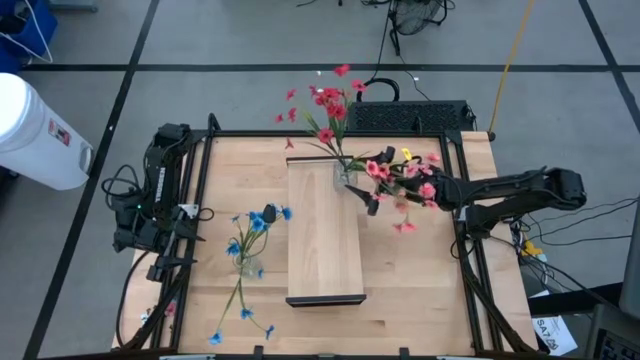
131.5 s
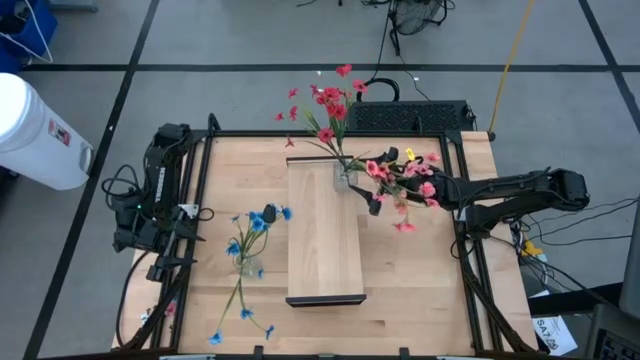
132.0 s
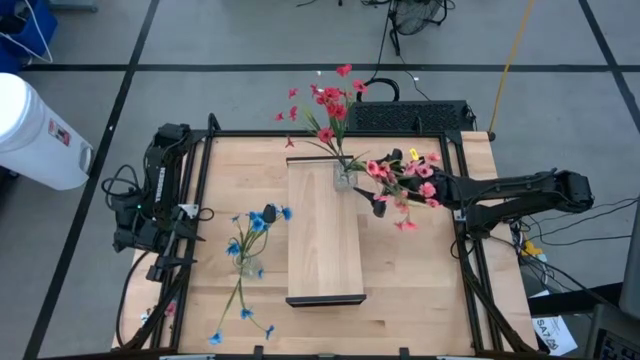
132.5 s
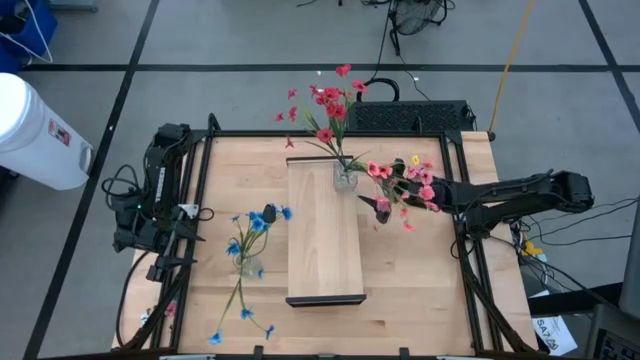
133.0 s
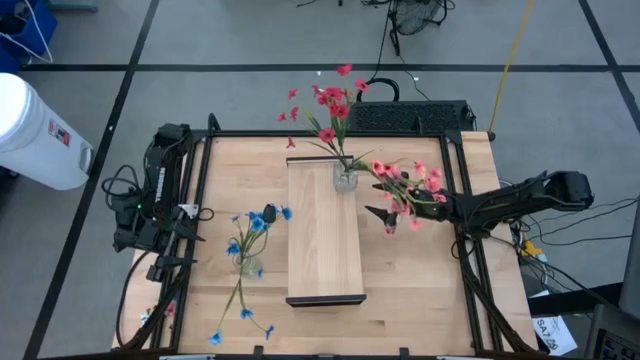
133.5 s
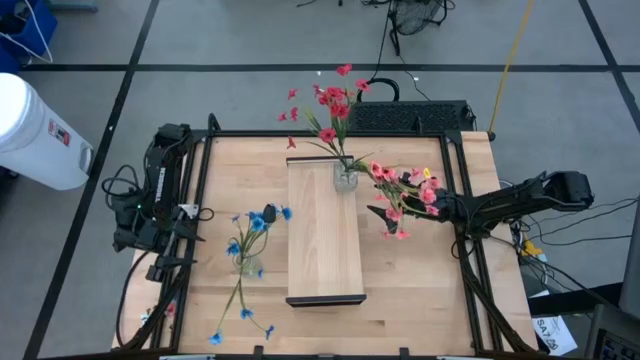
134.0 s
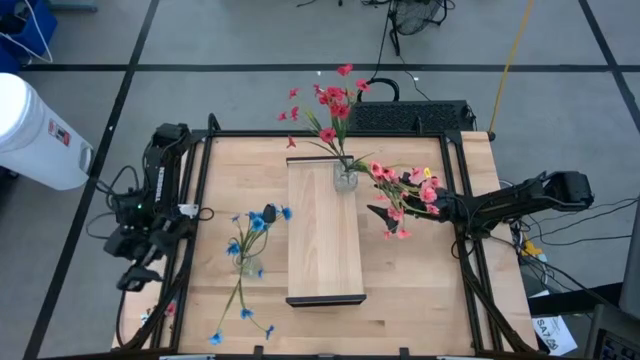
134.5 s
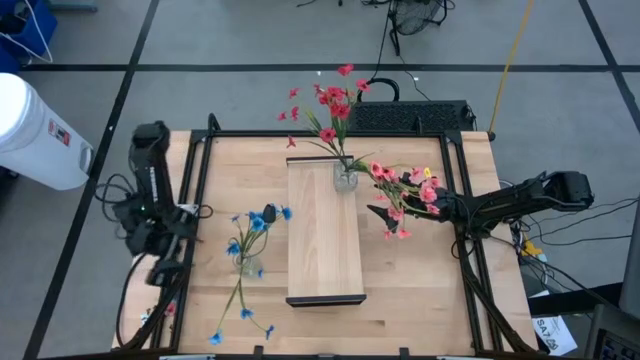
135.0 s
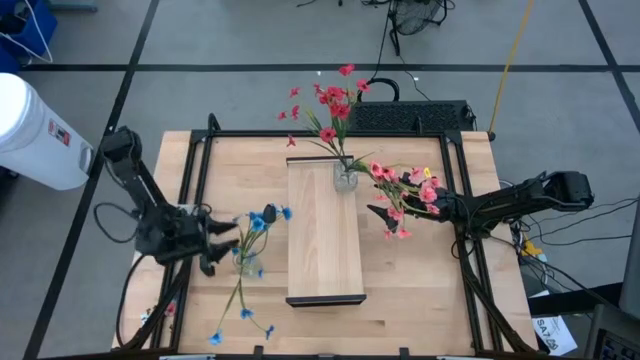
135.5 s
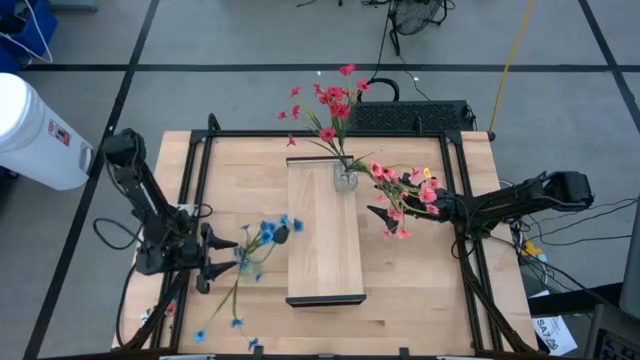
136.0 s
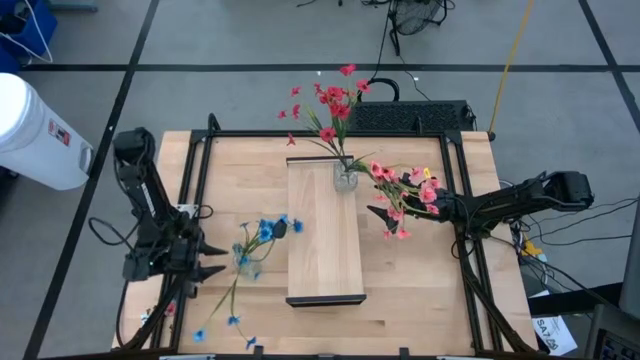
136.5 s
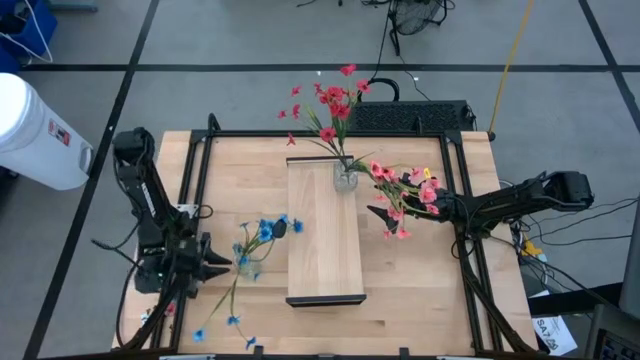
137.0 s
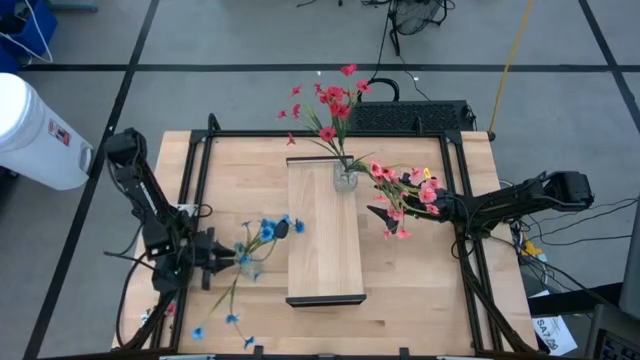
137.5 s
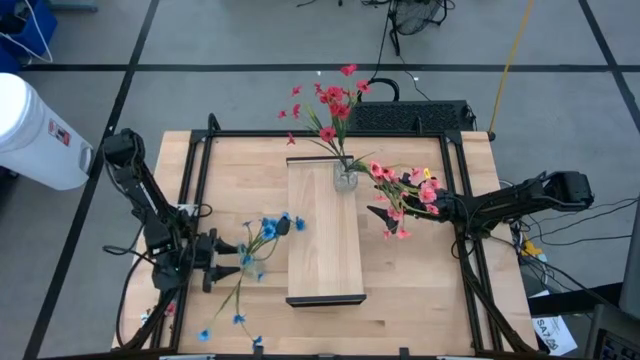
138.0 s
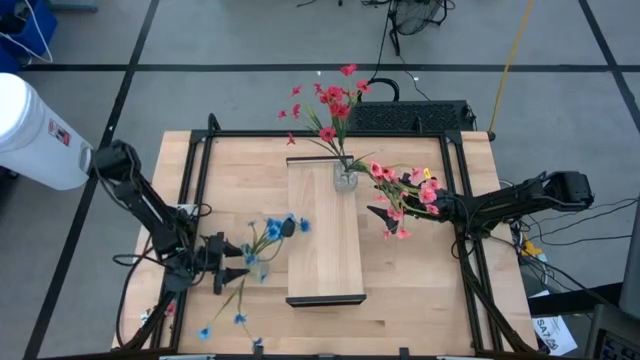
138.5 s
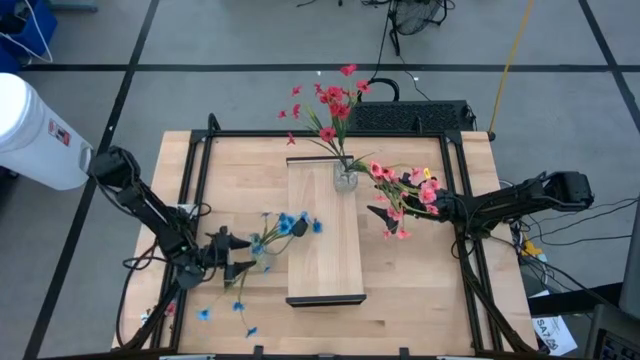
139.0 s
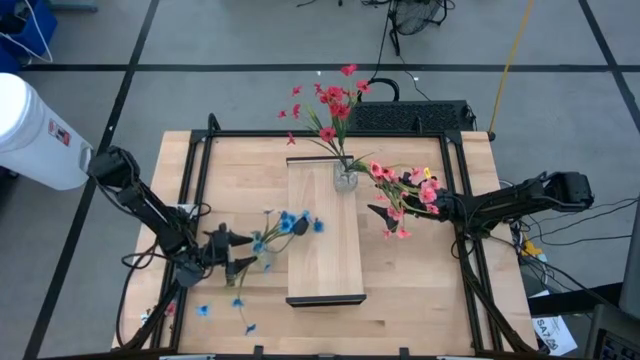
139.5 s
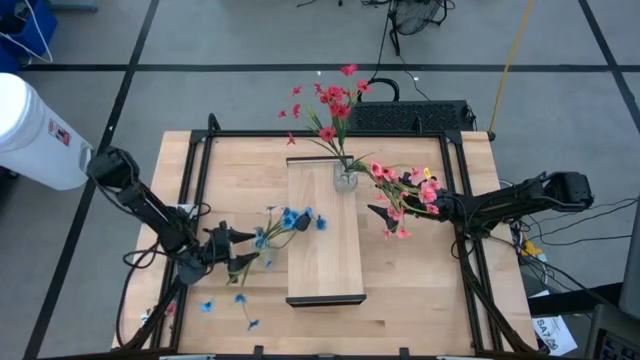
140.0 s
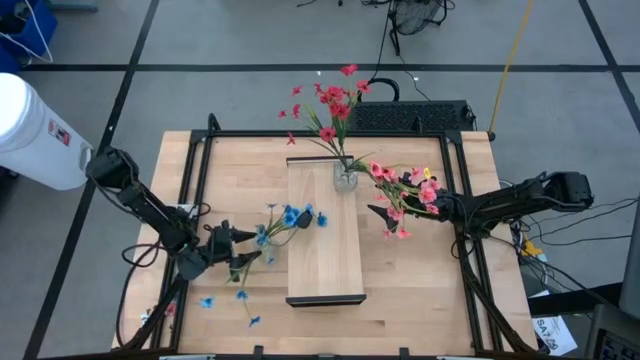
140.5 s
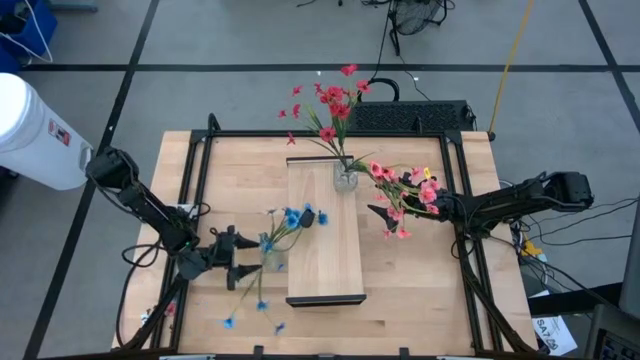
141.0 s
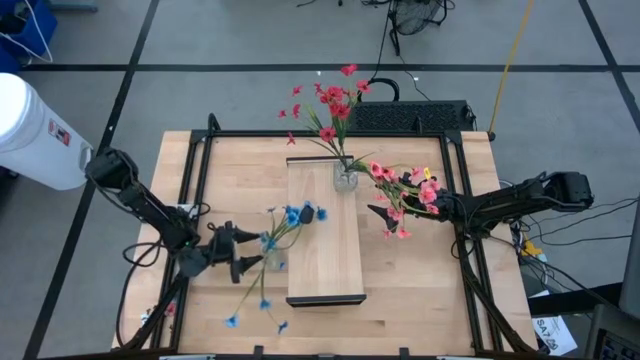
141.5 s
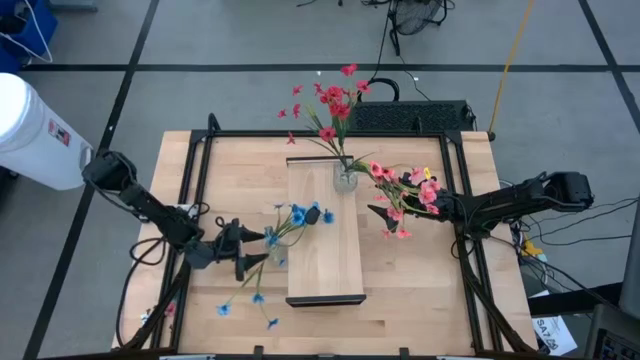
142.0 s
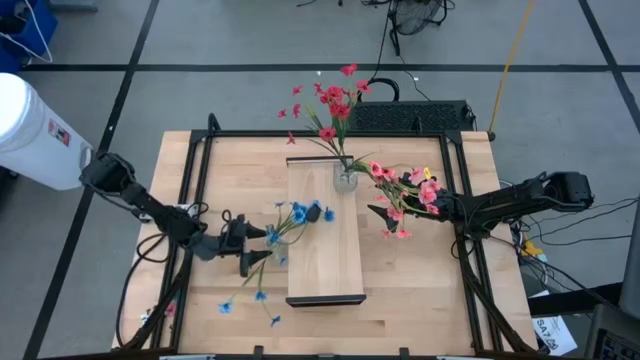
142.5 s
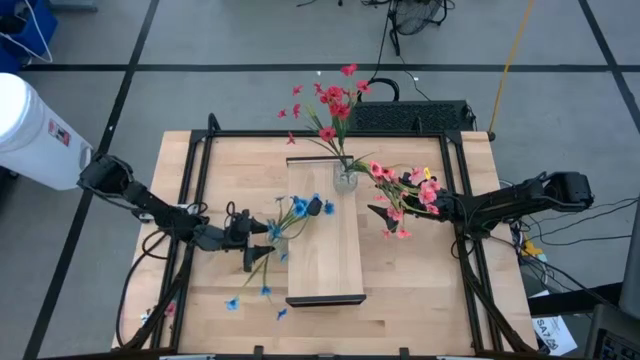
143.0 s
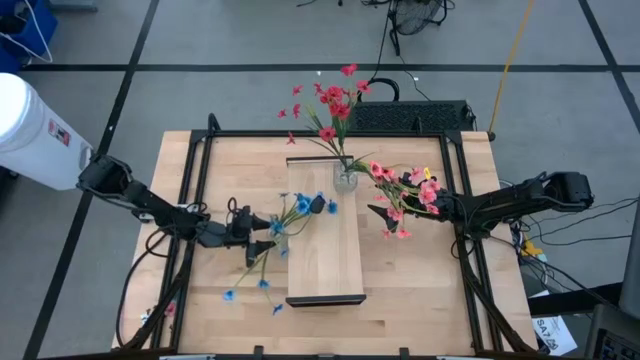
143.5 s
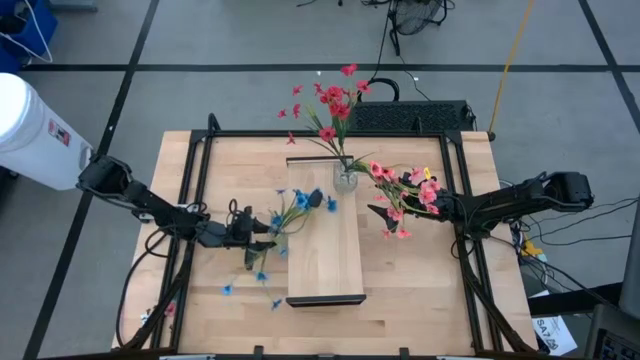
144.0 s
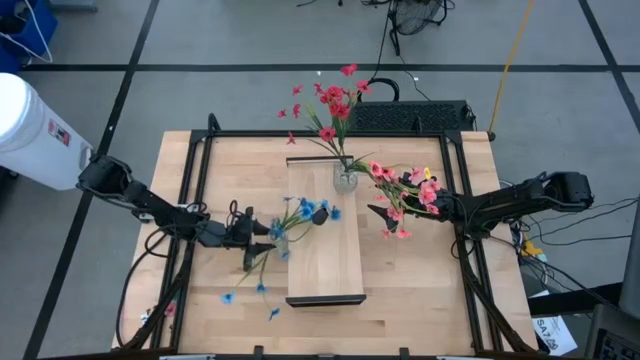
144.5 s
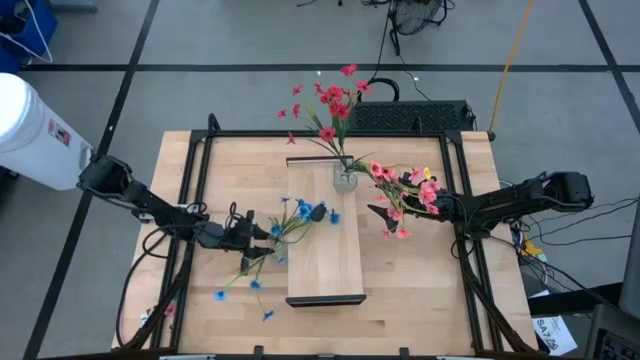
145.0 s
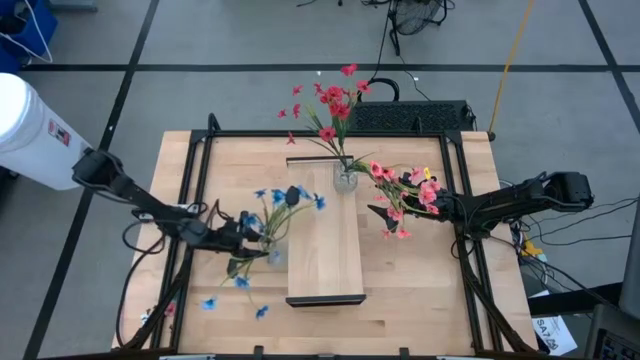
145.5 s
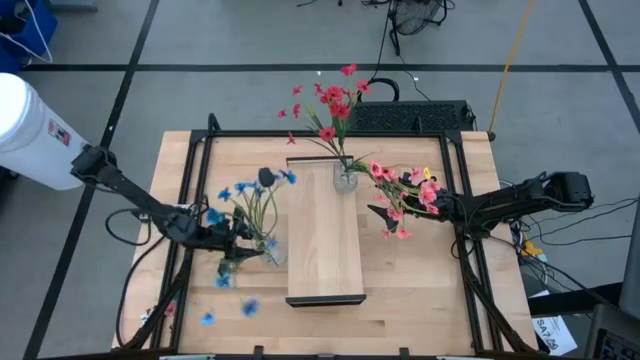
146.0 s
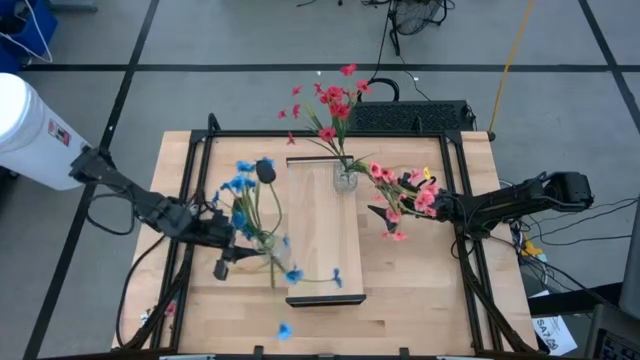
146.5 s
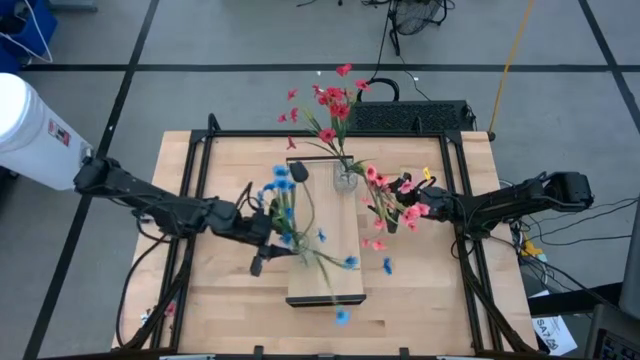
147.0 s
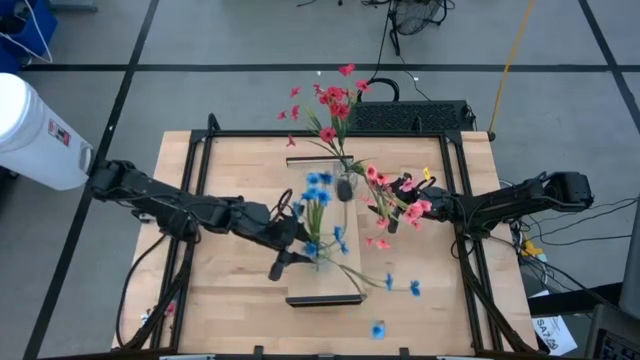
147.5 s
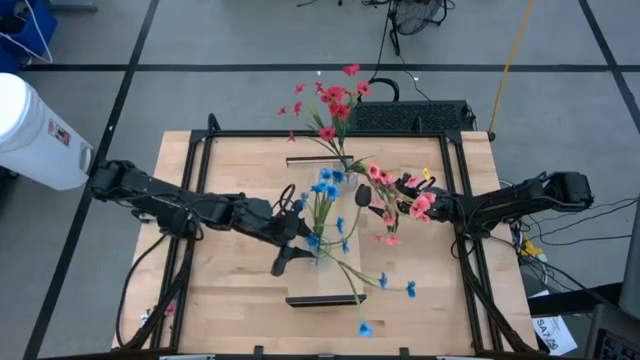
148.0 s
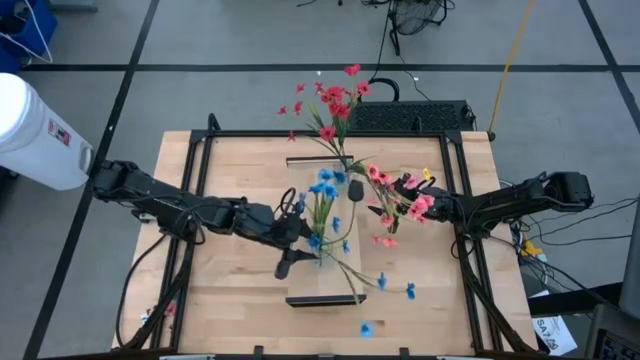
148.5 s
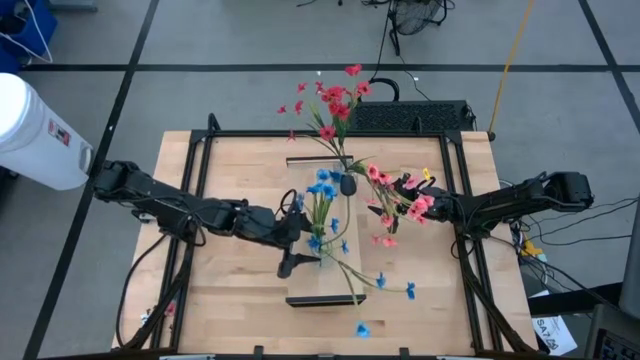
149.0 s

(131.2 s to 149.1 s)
Task: Pick and place flowers into a vace then onto a shelf
Put the transparent vase on the shelf

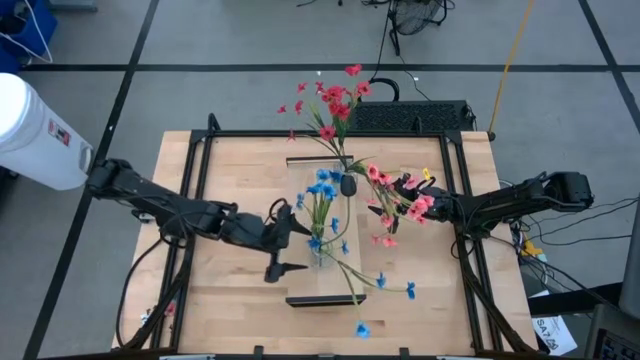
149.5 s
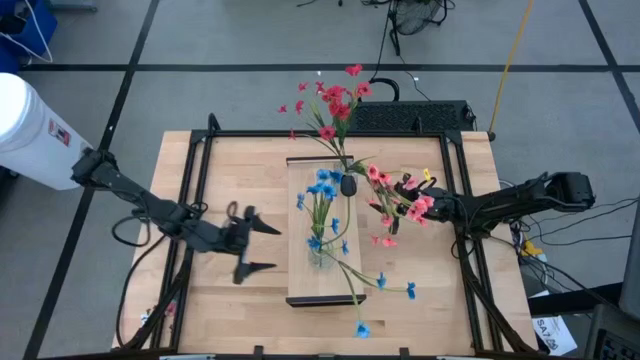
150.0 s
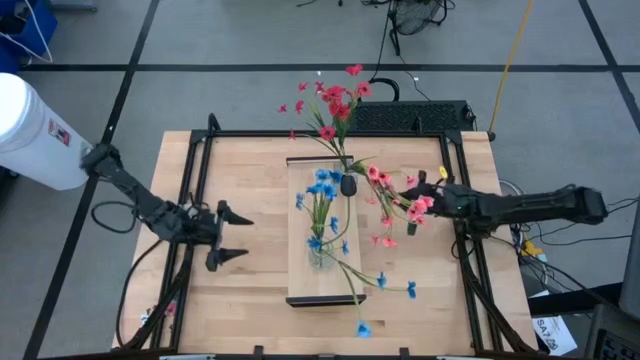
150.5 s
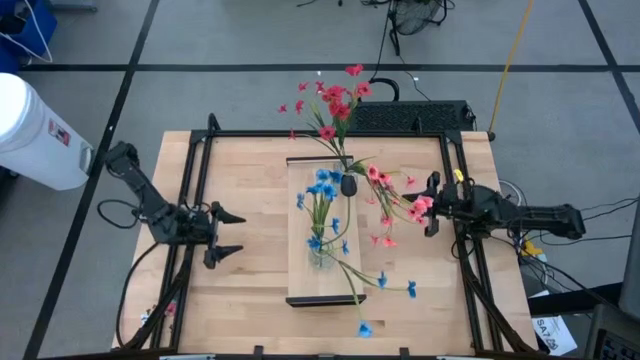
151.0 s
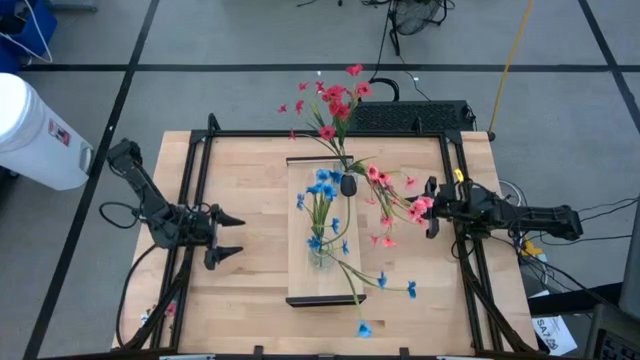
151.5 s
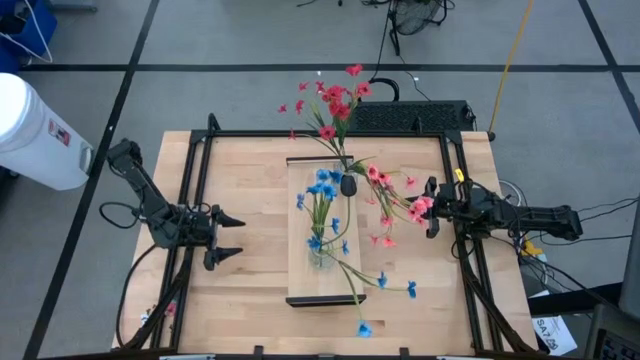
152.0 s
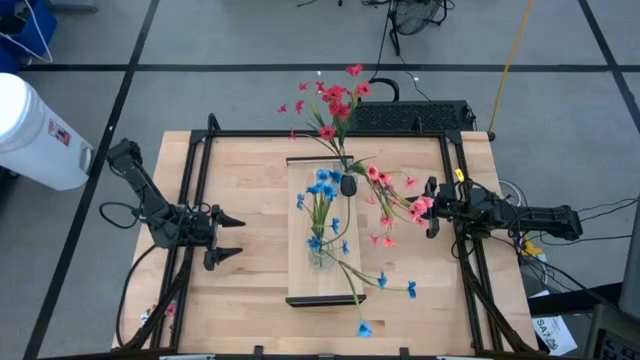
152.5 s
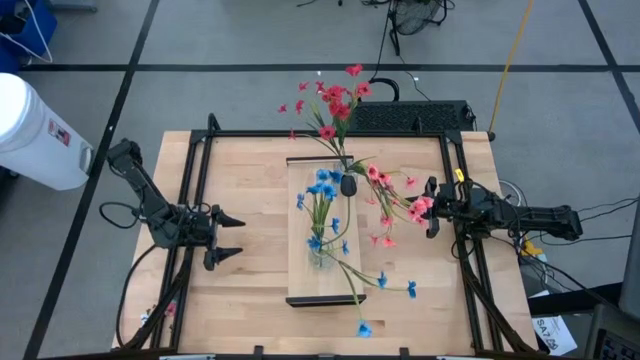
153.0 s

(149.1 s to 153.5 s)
Return to Home Position
